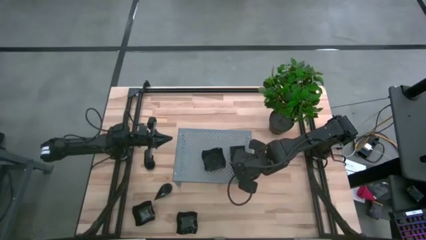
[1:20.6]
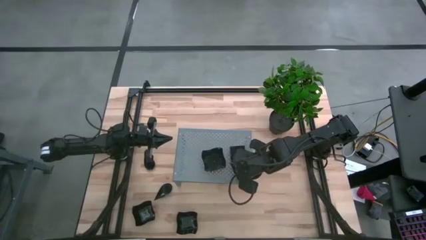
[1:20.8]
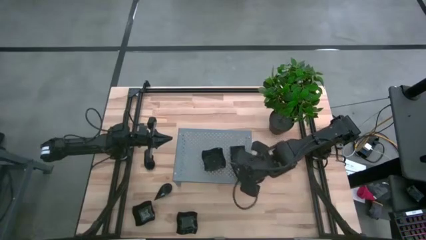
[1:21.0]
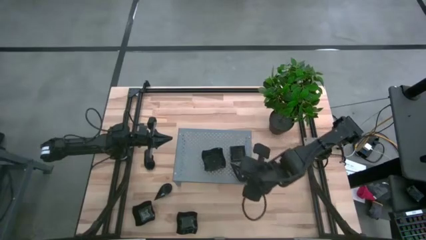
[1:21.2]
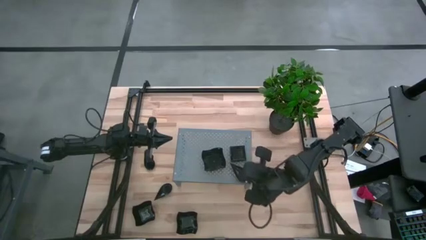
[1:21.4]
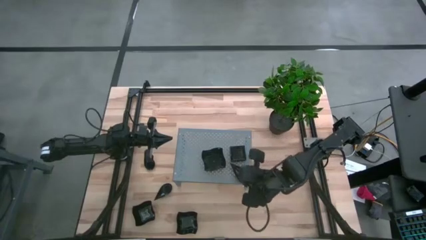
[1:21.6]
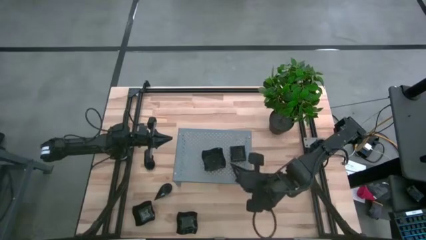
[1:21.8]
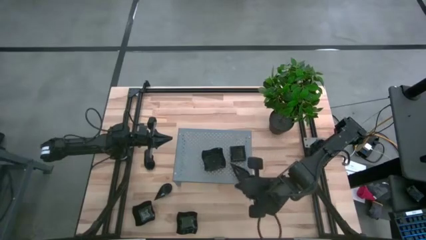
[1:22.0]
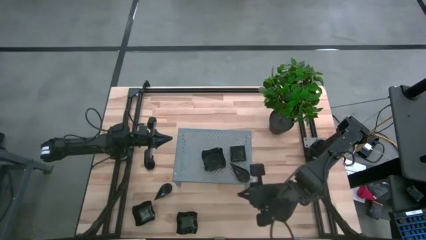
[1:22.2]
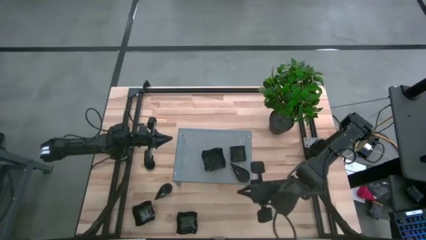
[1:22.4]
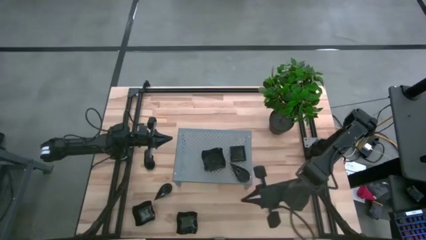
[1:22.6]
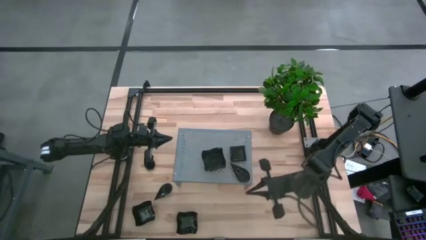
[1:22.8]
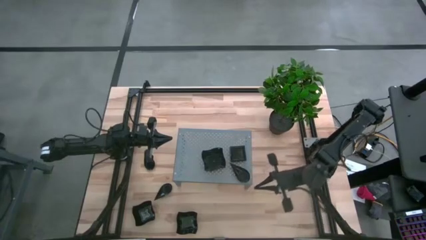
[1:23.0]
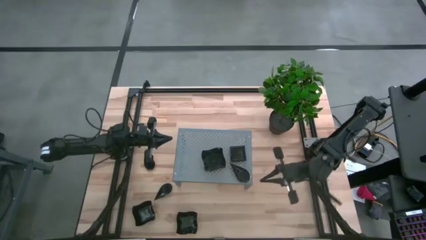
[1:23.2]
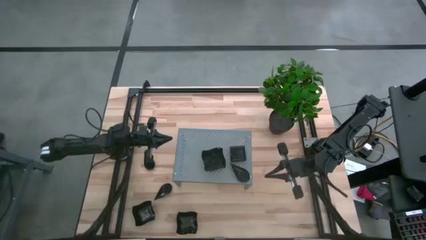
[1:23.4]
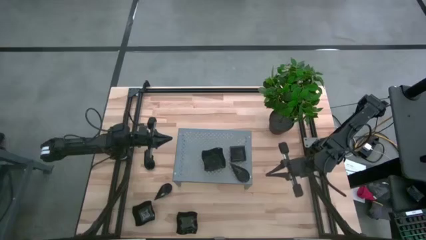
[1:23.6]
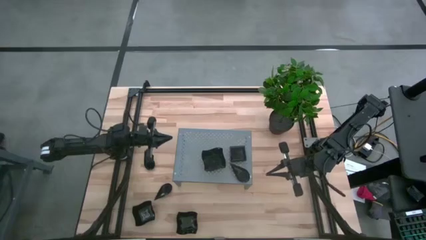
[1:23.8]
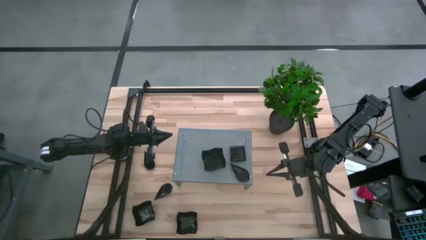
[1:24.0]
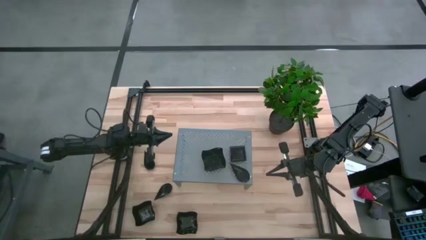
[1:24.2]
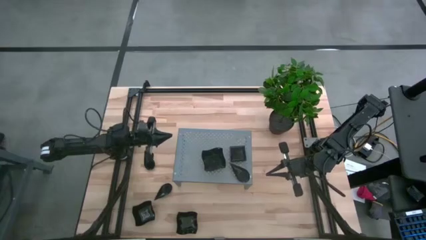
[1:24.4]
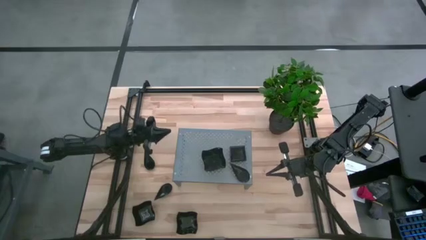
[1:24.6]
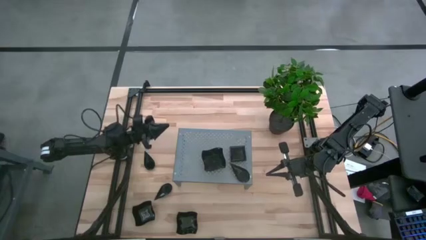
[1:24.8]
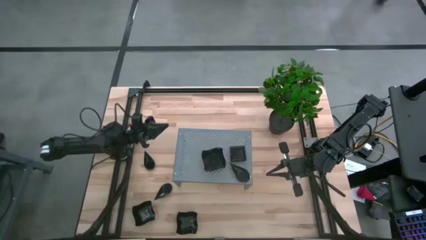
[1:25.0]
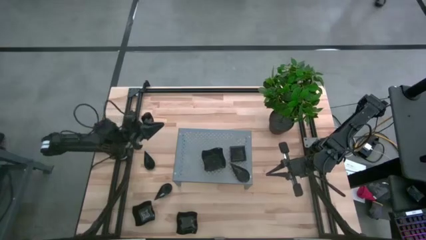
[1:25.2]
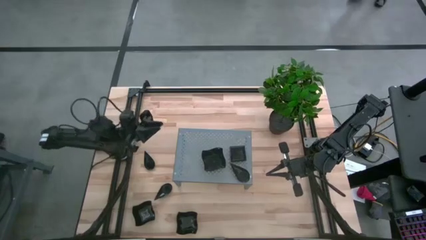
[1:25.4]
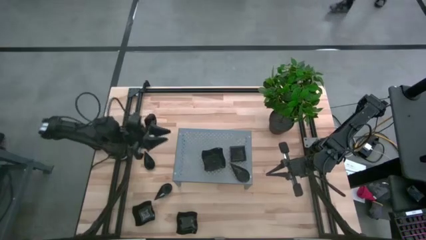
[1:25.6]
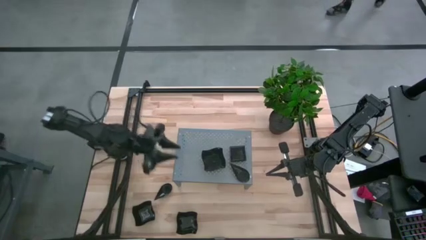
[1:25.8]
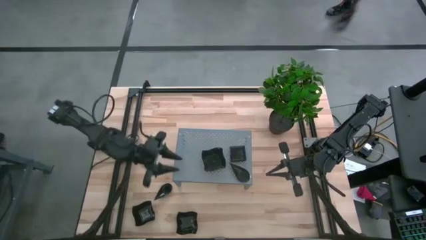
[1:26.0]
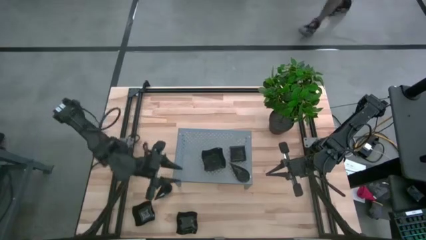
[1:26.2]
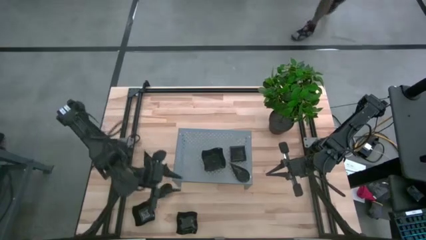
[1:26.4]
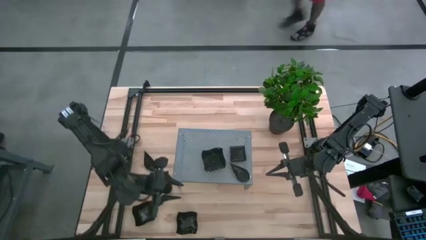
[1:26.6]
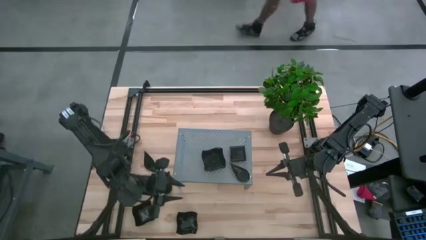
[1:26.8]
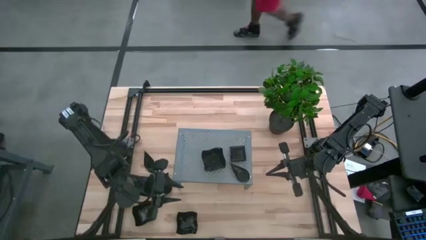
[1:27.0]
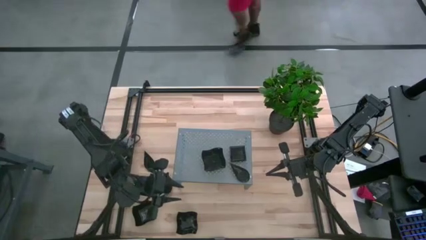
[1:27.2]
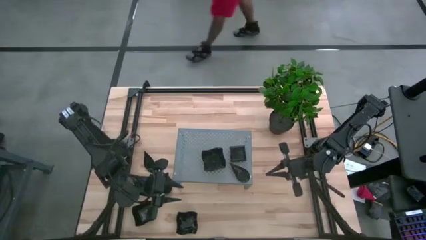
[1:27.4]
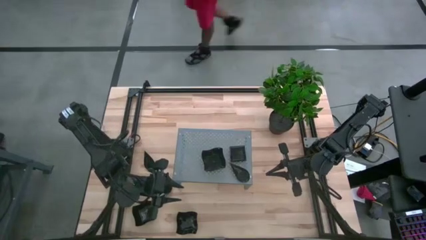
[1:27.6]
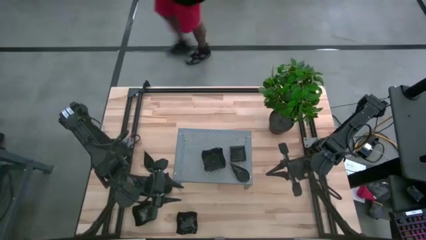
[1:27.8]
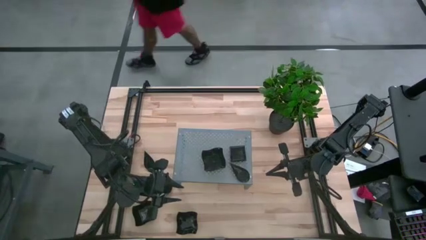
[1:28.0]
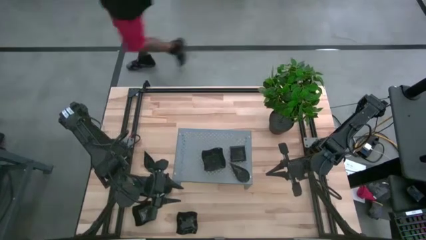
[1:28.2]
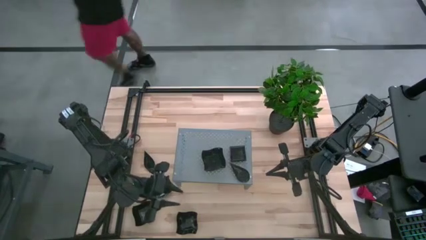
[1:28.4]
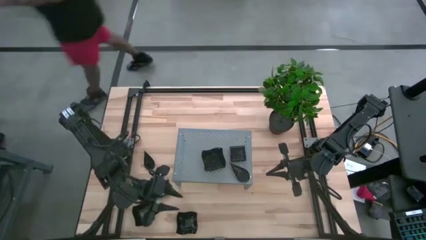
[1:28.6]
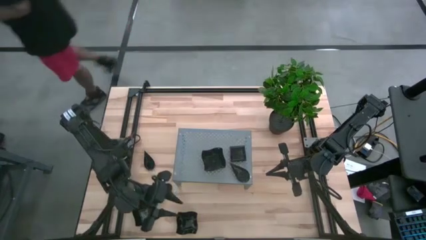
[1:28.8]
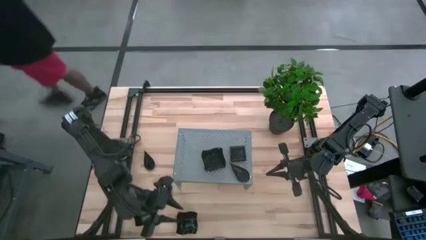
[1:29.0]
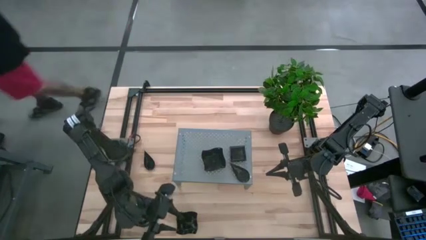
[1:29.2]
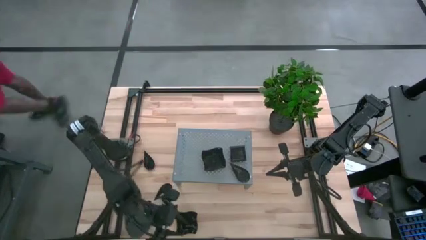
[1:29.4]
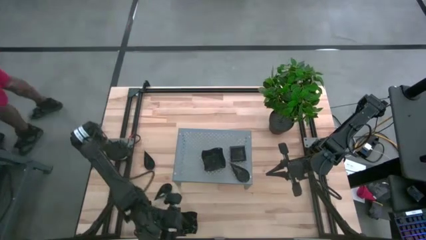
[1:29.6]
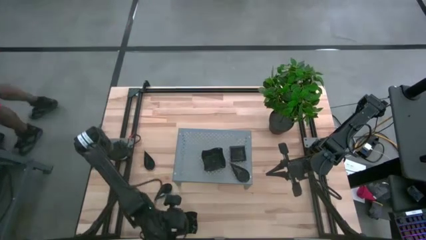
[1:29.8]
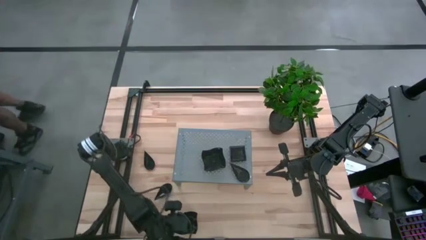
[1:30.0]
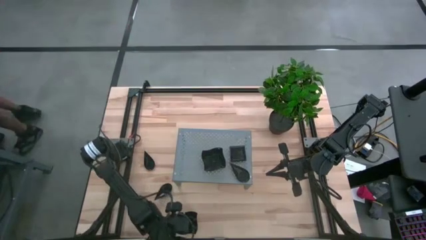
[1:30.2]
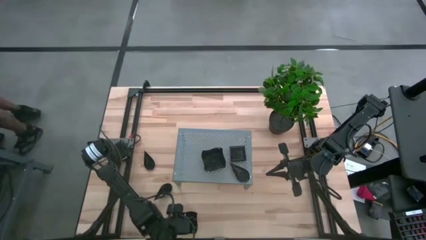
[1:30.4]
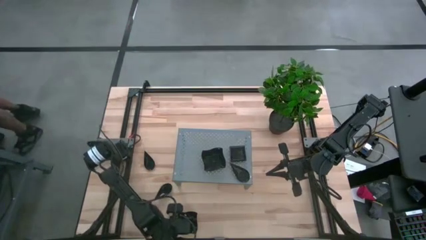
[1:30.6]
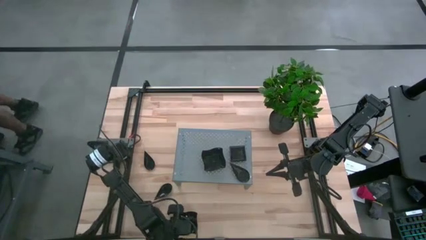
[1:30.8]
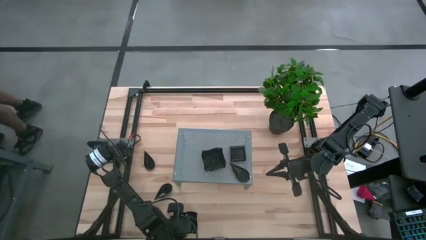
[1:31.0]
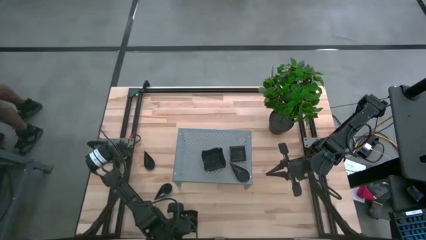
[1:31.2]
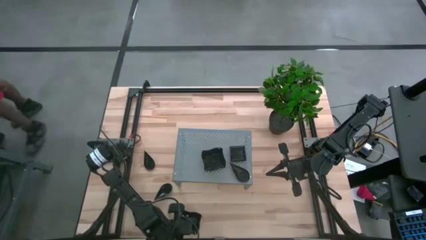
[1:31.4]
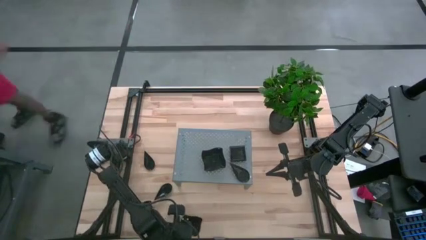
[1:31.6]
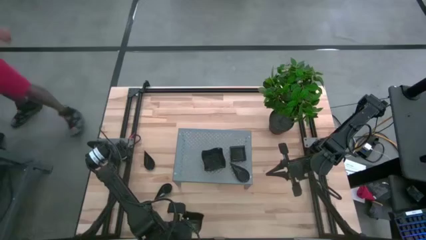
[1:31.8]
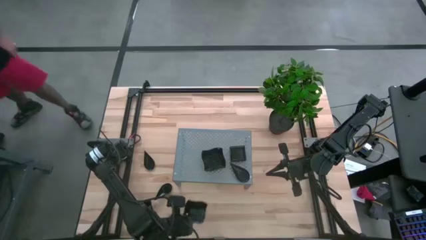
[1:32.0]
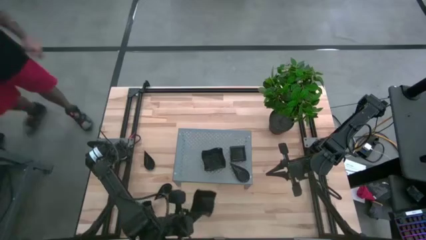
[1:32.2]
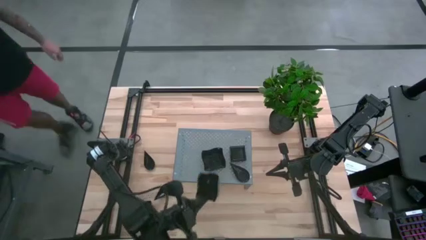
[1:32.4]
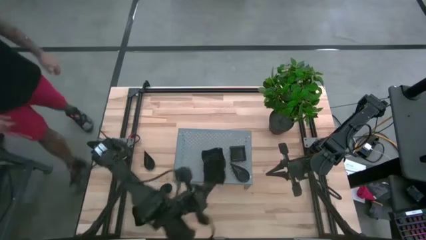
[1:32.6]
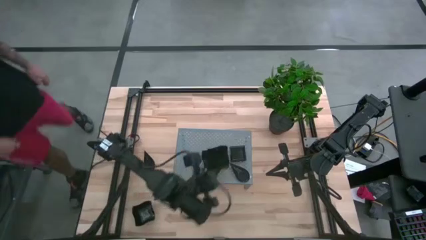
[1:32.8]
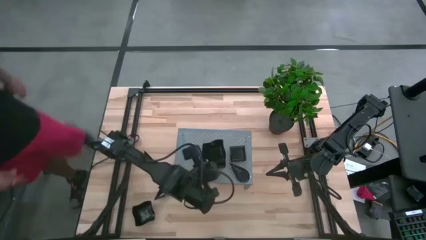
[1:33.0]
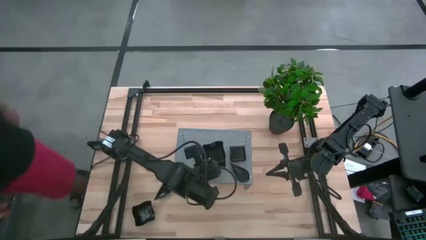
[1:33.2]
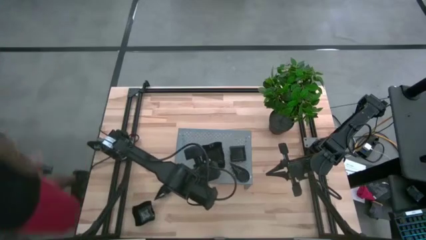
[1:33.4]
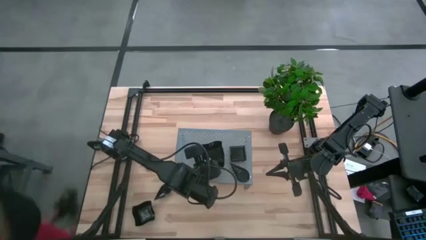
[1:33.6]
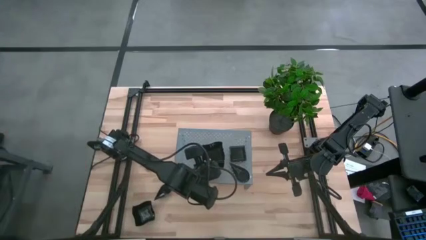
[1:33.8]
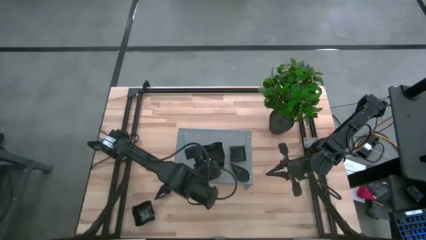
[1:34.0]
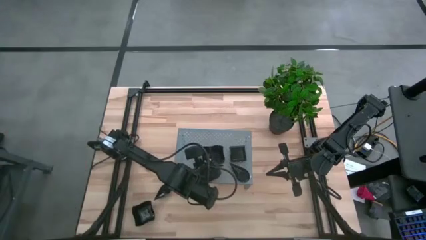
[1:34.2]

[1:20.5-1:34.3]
Task: Pick & Place Mini shaped plates
Stack the black distorted plate on the distorted plates on the shelf
